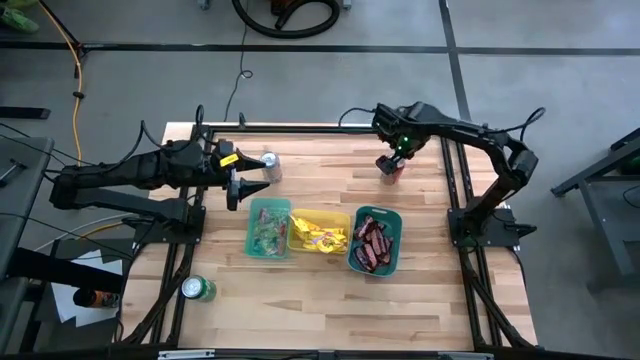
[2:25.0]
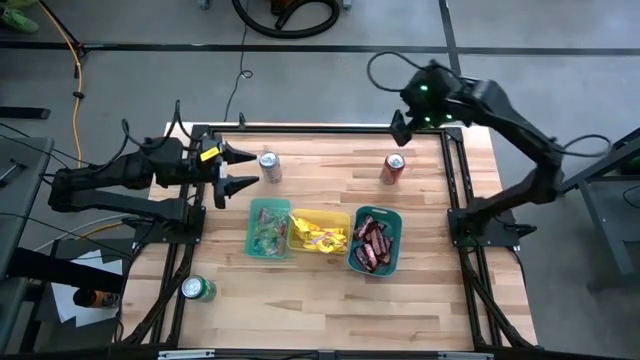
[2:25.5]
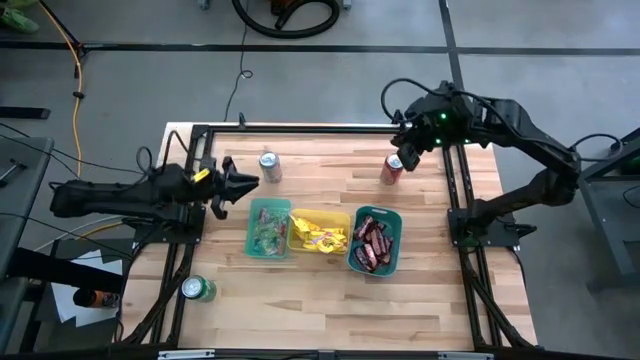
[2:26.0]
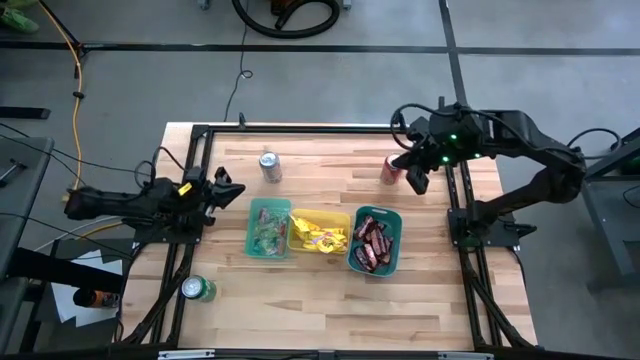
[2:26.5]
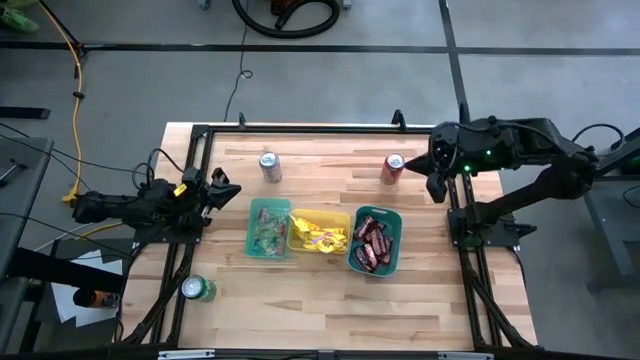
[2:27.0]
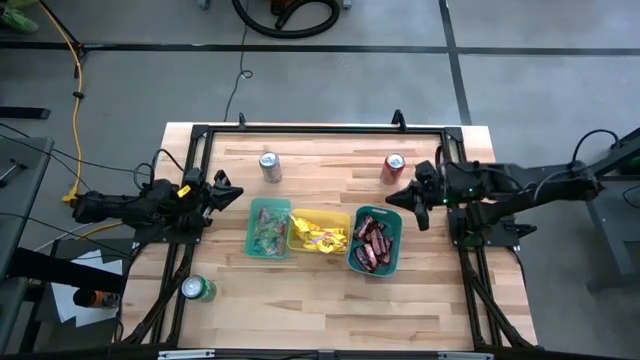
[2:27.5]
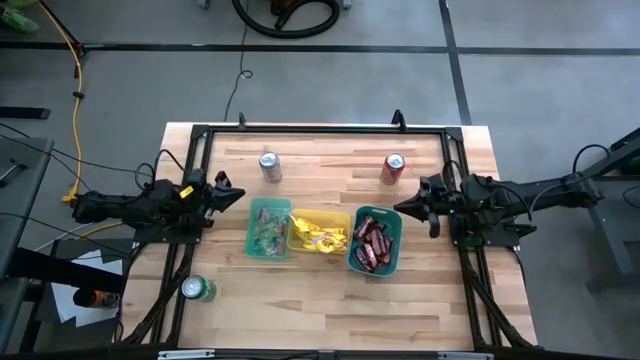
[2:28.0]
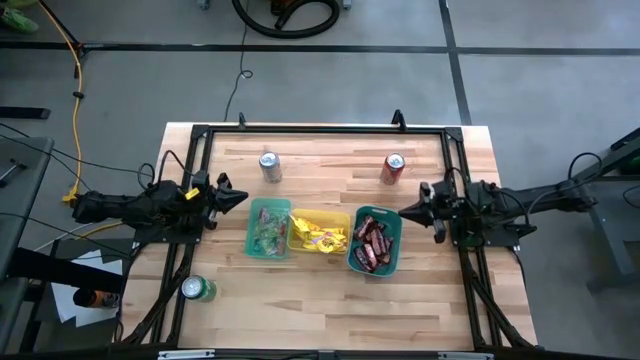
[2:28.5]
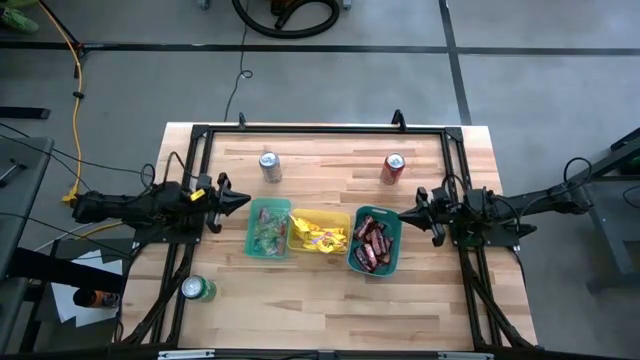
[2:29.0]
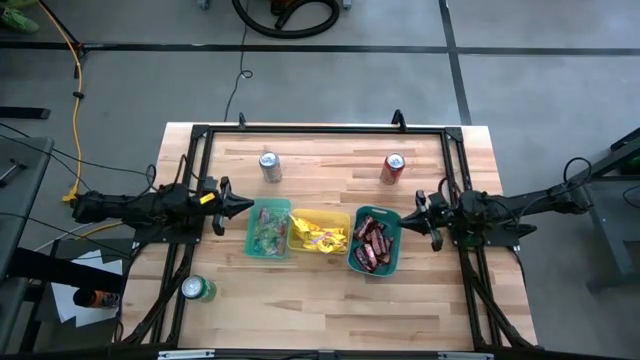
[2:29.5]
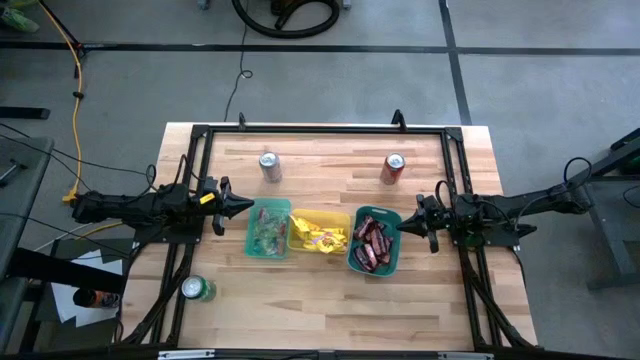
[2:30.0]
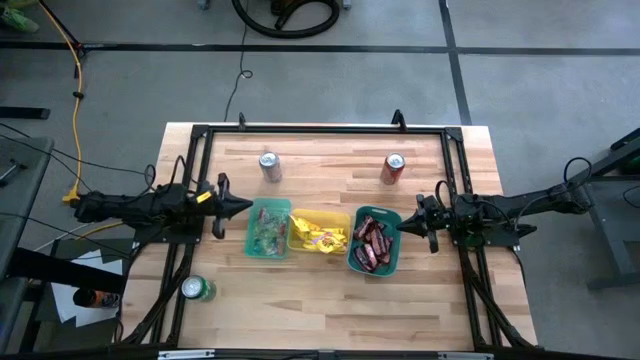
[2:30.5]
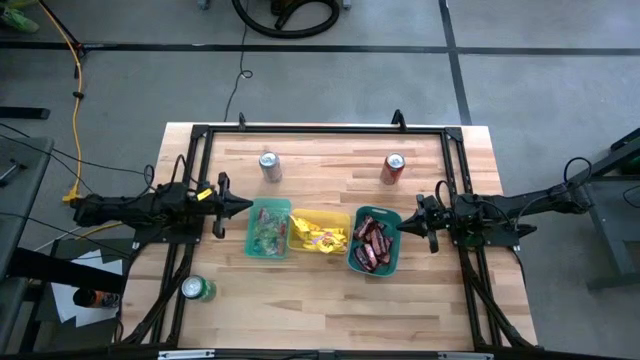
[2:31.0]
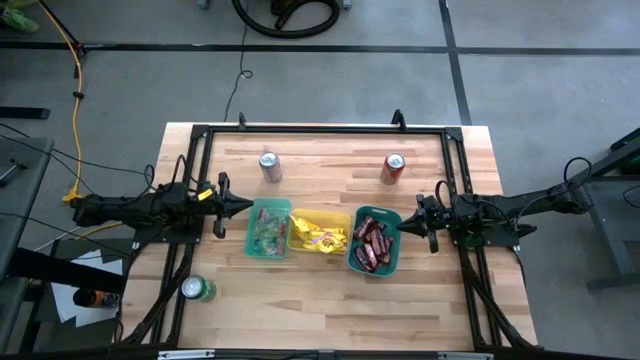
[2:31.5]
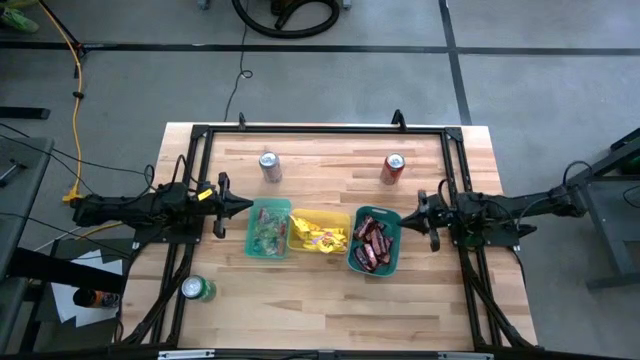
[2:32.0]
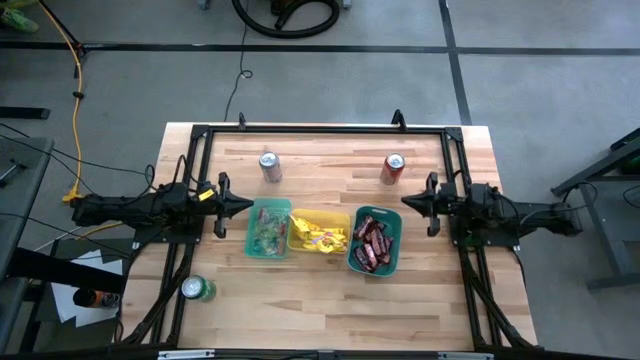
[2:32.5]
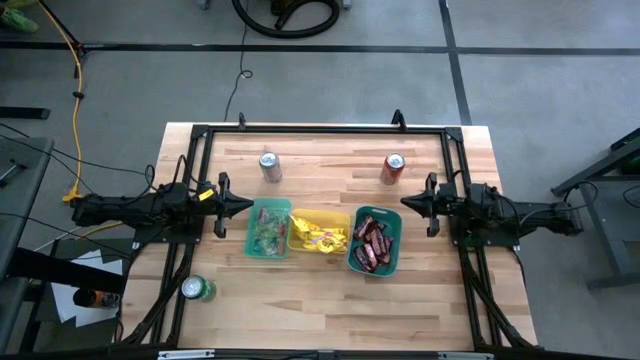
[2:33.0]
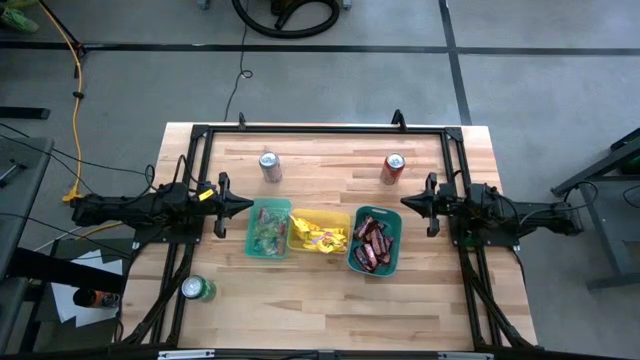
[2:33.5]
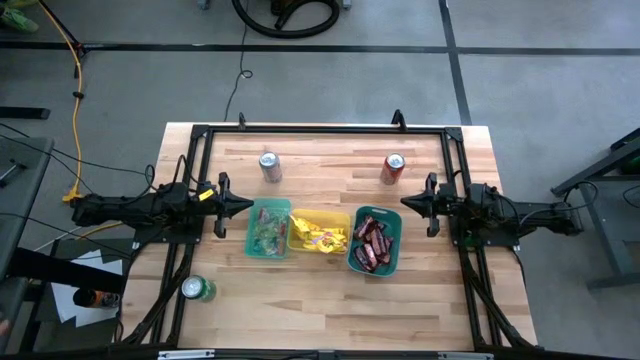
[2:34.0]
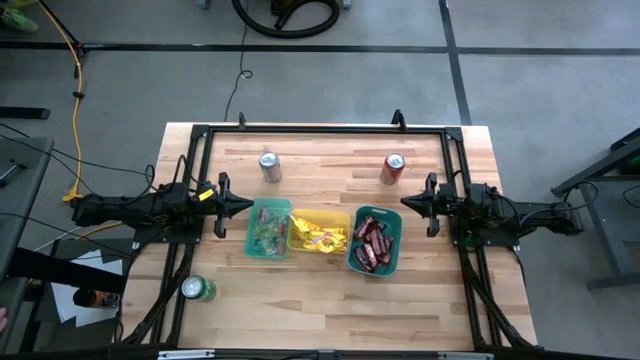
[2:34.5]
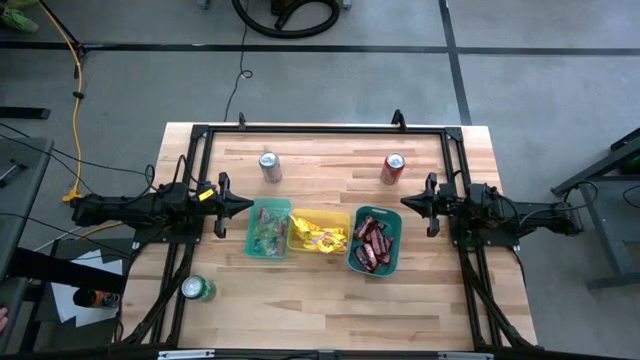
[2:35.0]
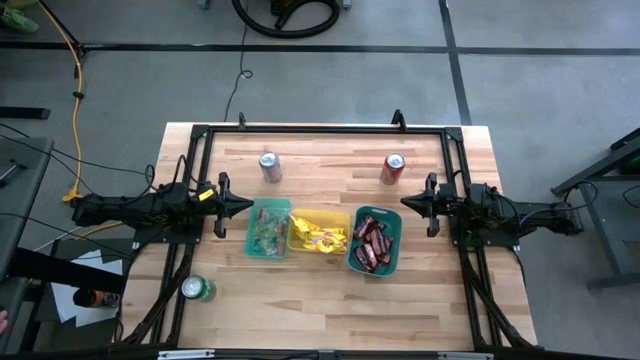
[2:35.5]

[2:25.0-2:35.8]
Task: Sort candy
Return to Home Position

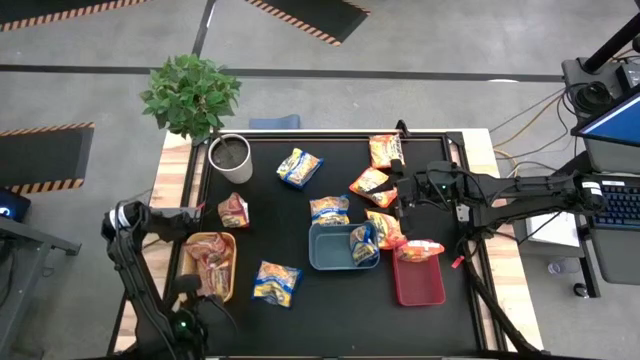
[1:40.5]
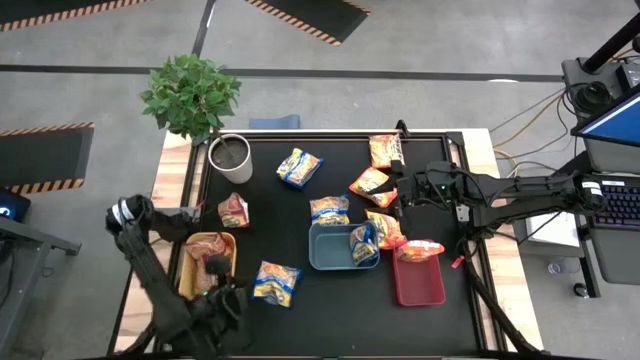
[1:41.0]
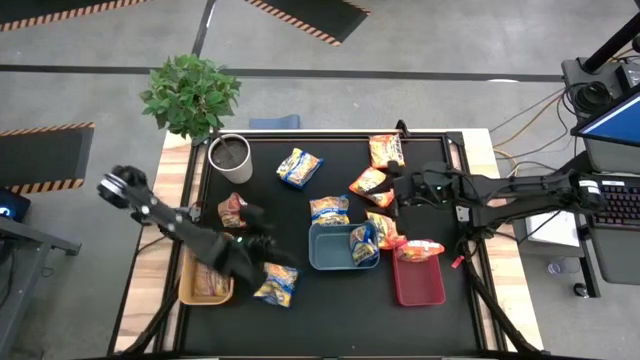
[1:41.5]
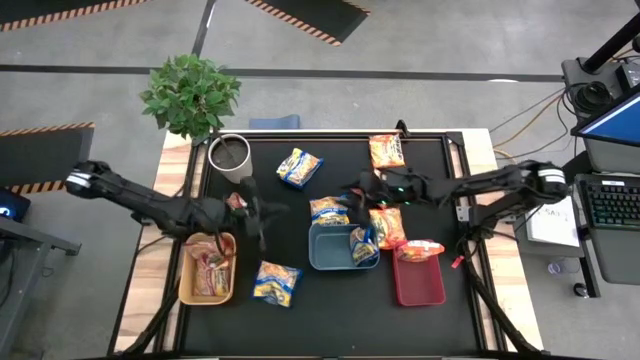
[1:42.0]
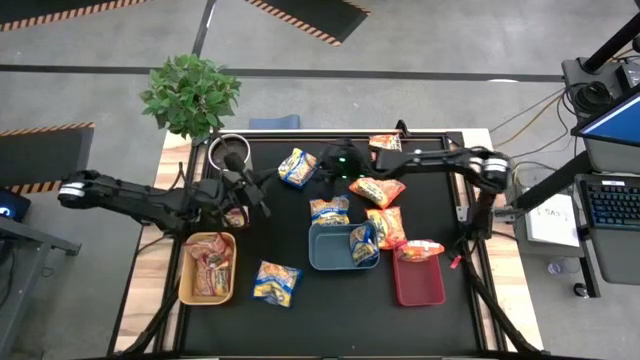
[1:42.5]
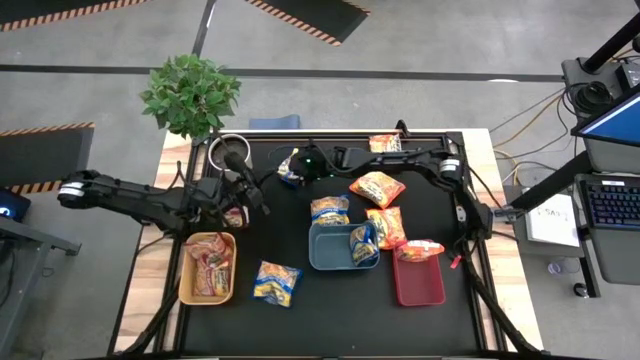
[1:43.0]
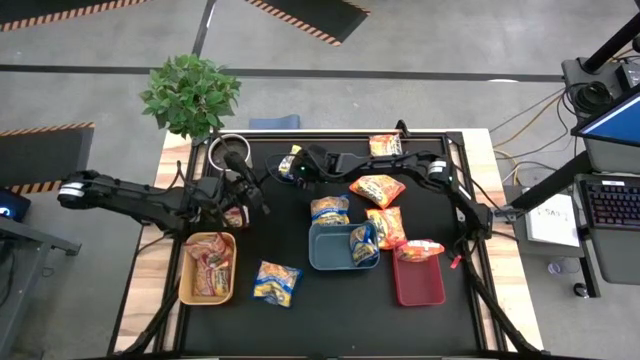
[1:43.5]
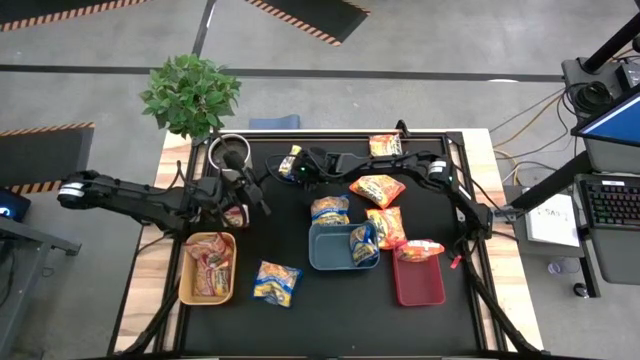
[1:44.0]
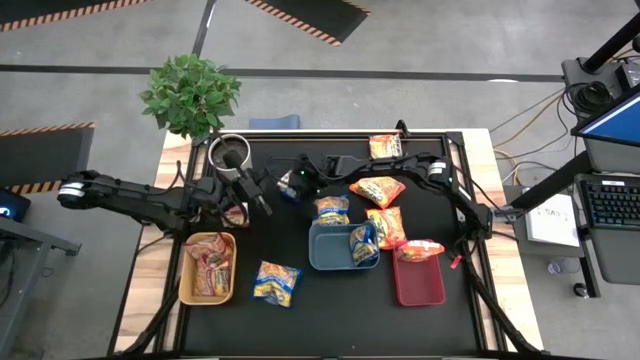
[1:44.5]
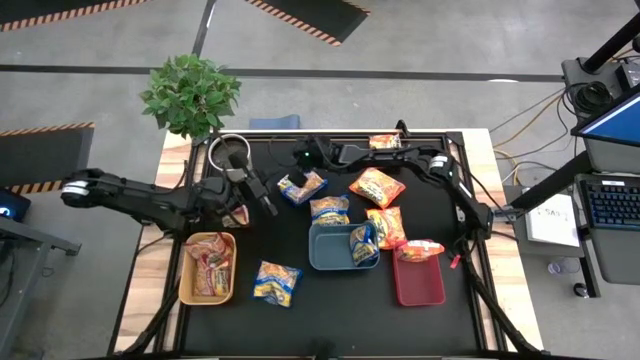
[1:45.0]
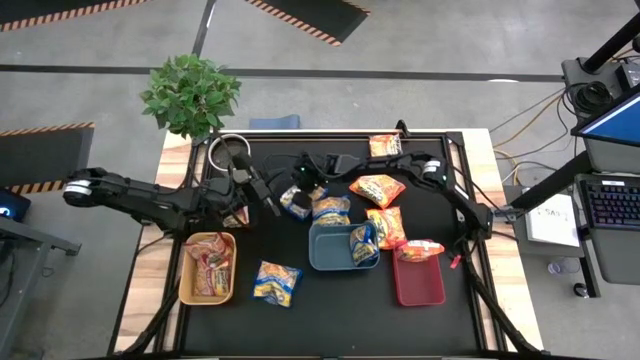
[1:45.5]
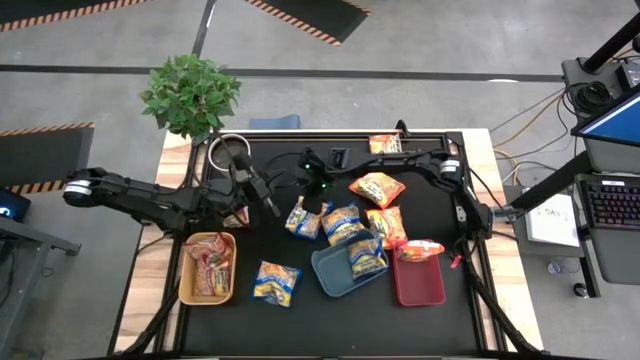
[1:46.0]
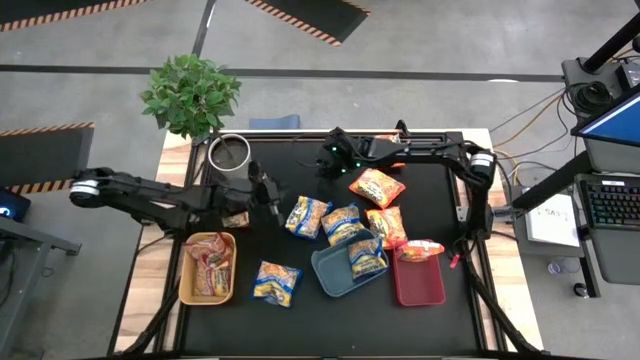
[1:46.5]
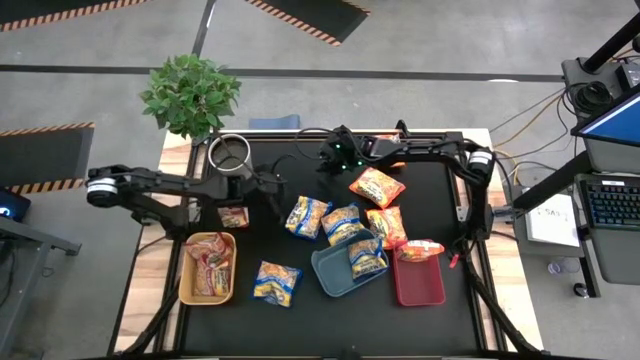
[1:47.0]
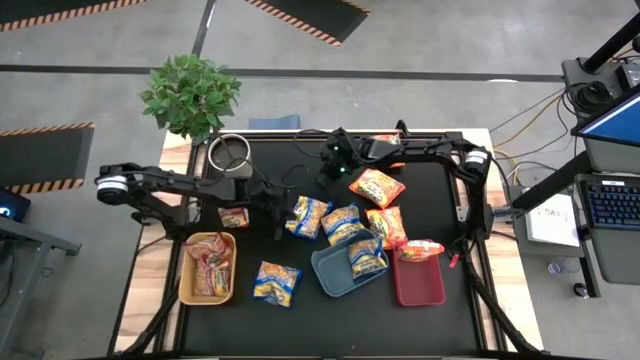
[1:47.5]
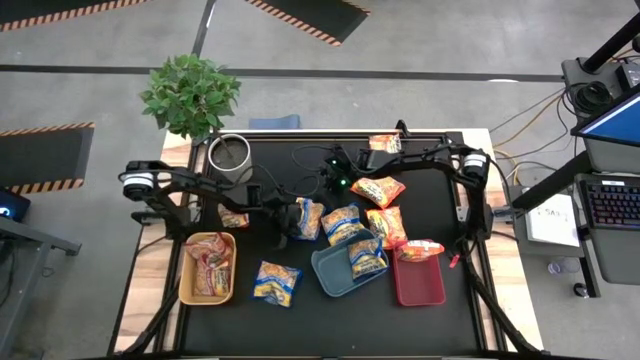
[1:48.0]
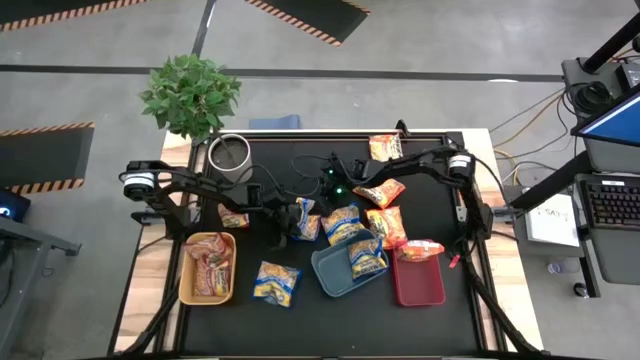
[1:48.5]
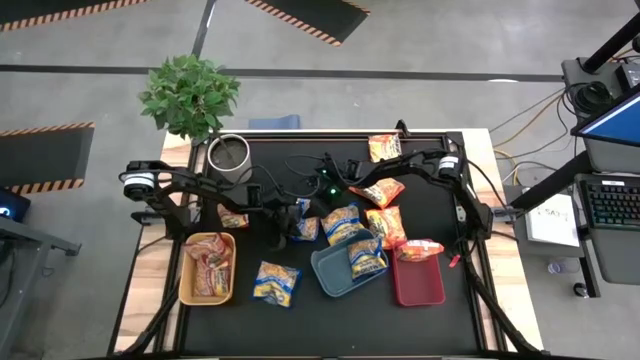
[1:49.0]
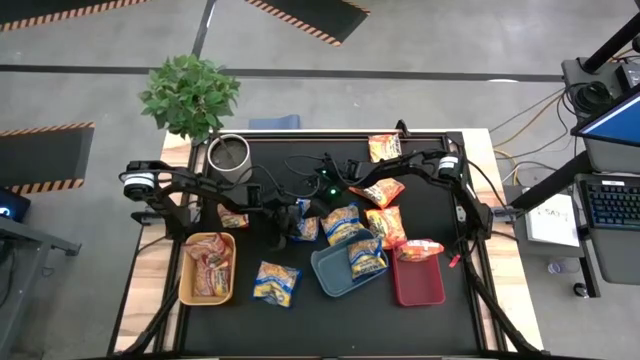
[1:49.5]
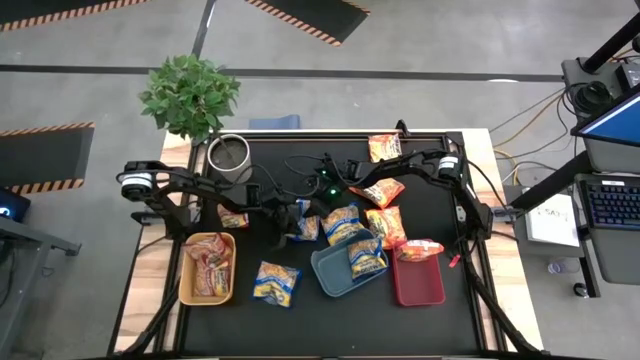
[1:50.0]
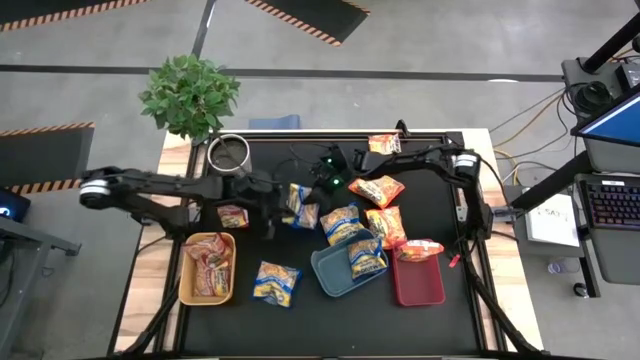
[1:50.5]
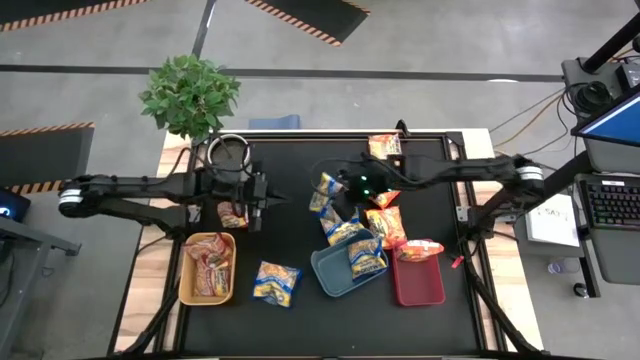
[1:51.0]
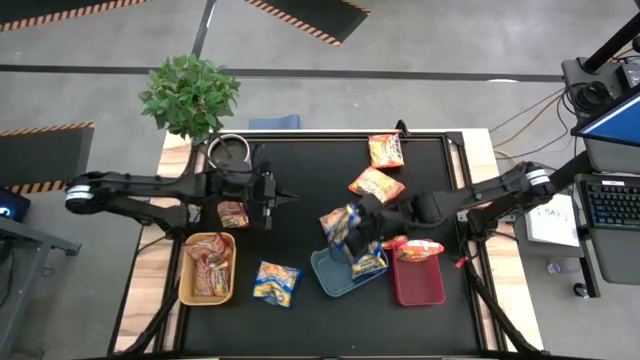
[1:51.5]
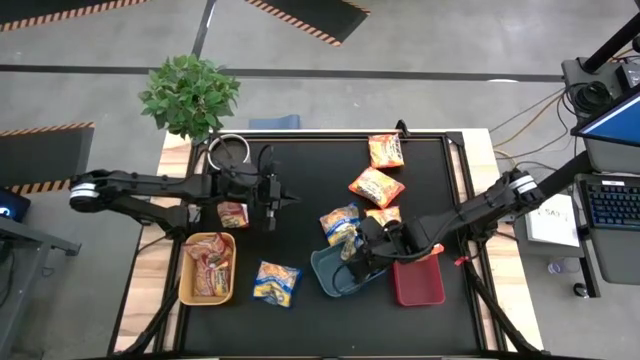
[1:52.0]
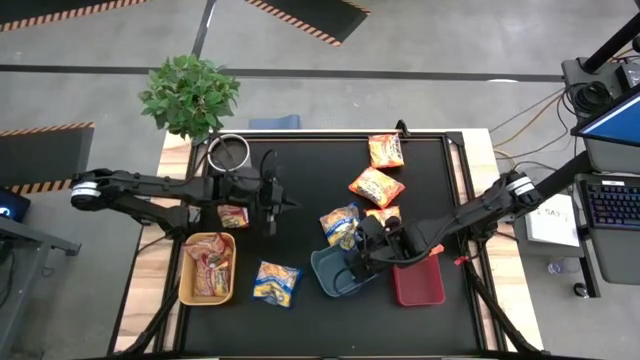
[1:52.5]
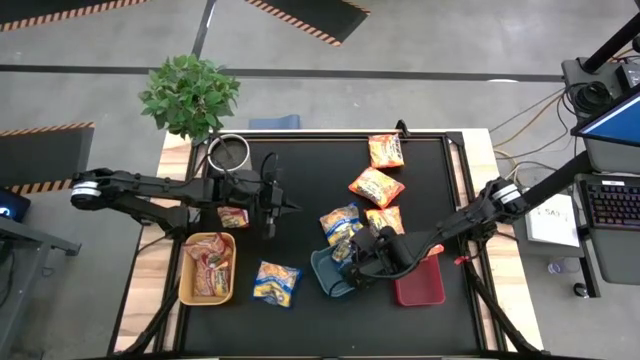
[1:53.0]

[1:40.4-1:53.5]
Task: Sort Maruchan noodles
Put the top blue noodle pack into the blue bin
